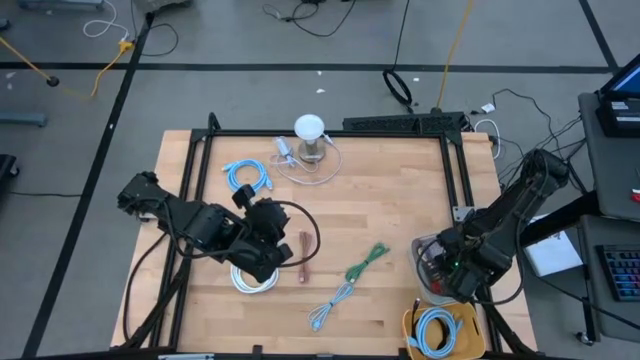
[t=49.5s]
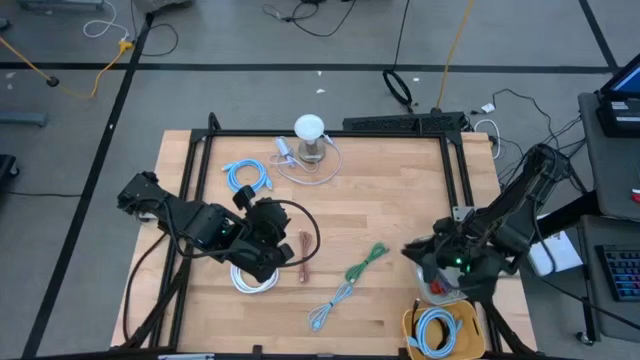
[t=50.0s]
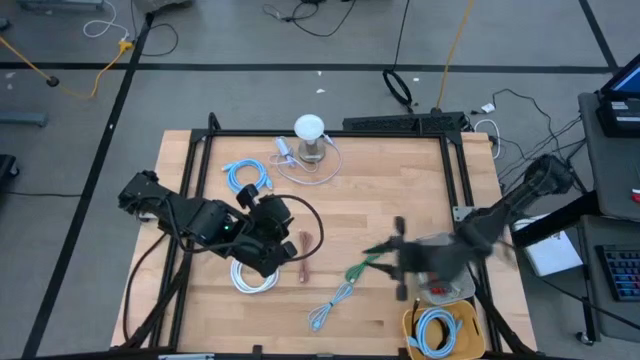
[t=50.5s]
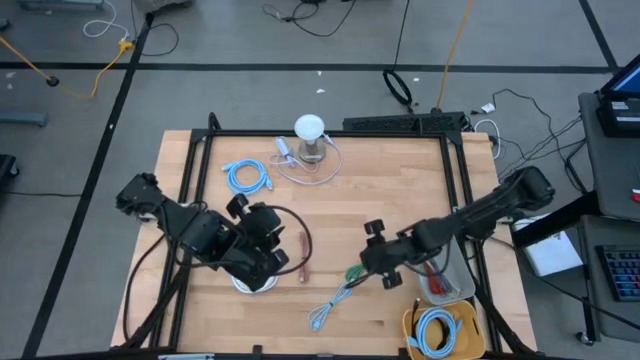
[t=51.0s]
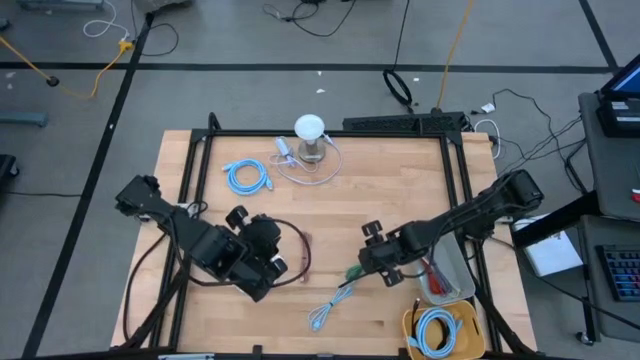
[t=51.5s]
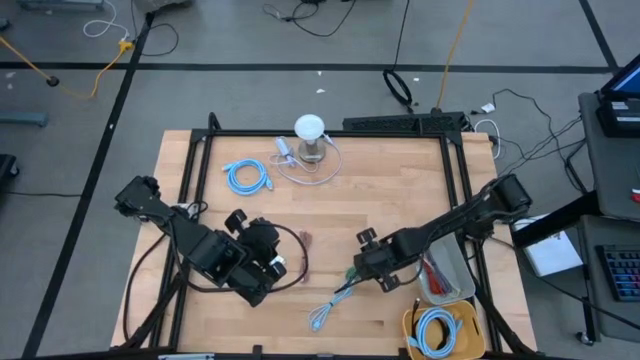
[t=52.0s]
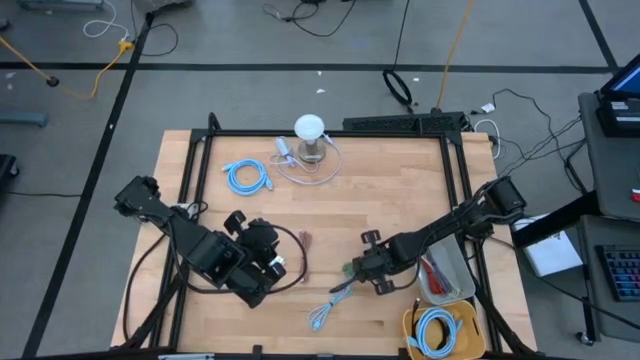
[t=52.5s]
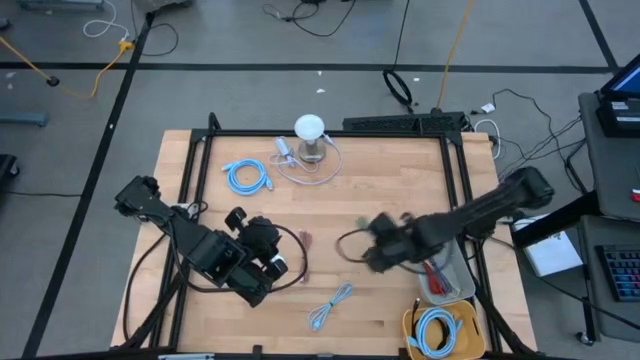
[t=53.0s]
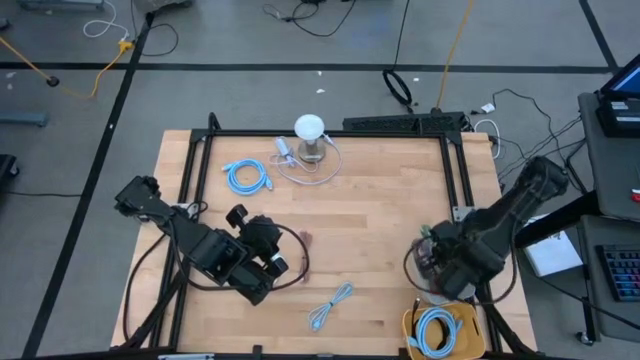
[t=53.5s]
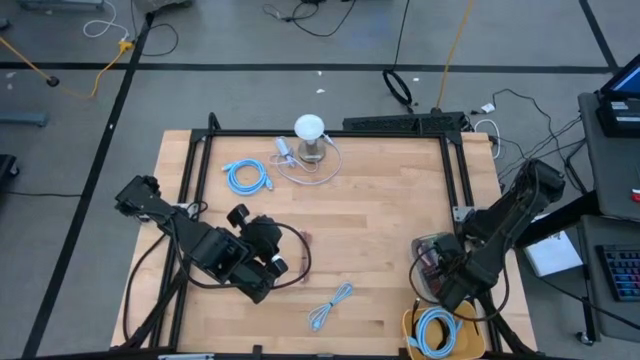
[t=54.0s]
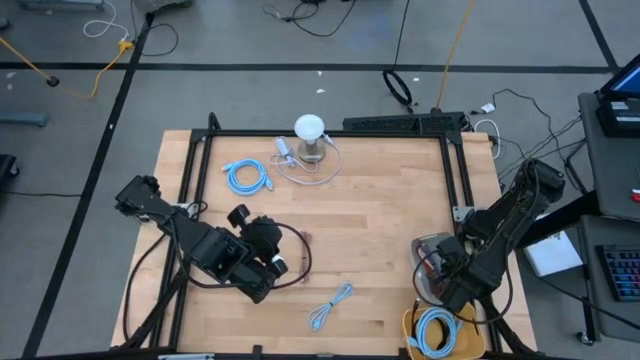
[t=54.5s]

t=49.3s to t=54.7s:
Task: Pick & Place USB Port
Put the green USB cable into the gray bin

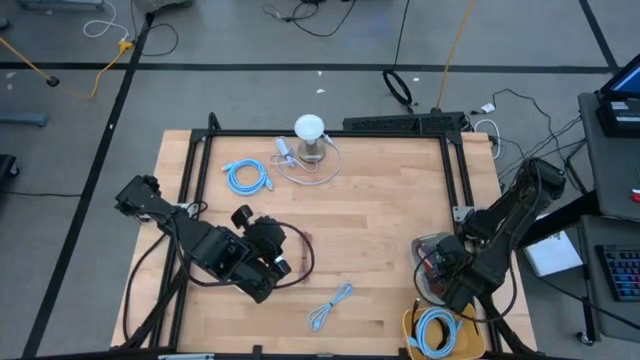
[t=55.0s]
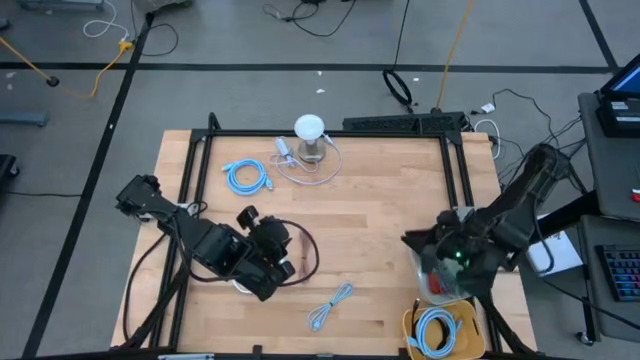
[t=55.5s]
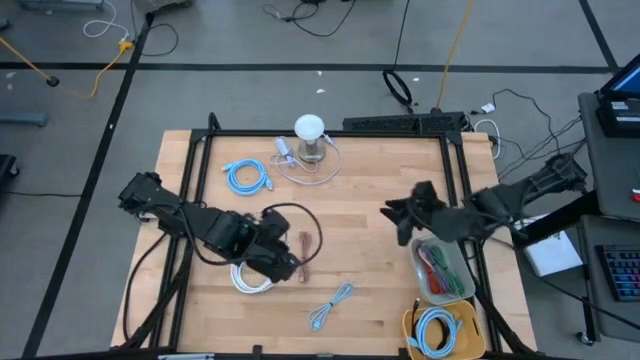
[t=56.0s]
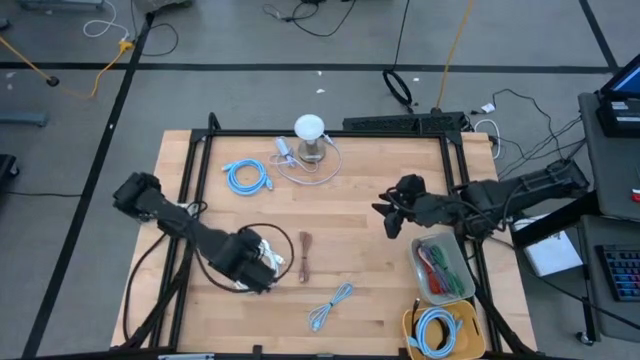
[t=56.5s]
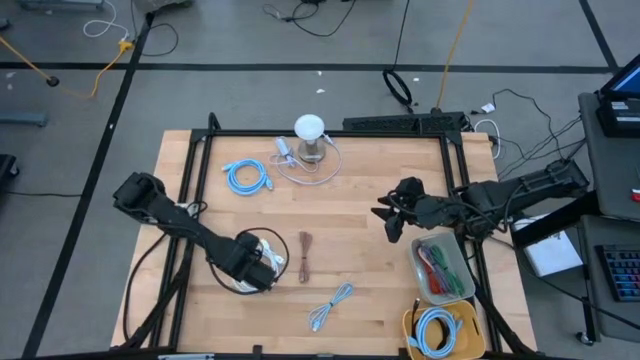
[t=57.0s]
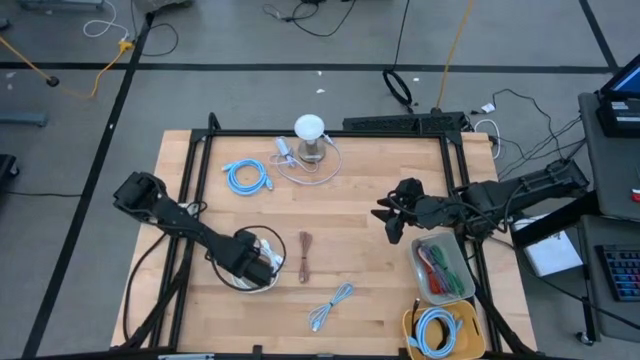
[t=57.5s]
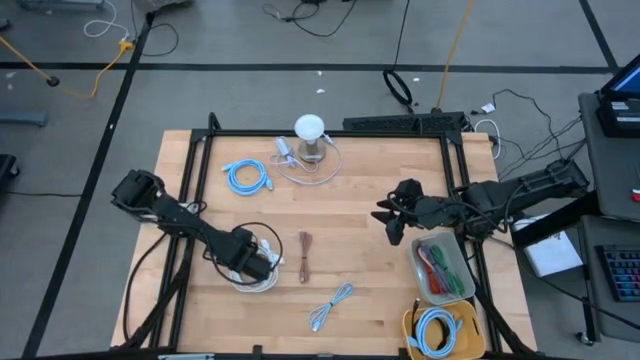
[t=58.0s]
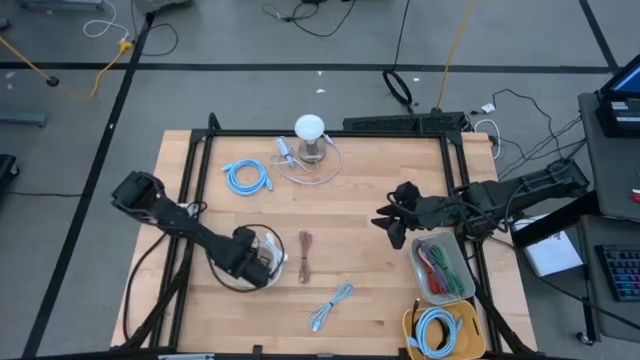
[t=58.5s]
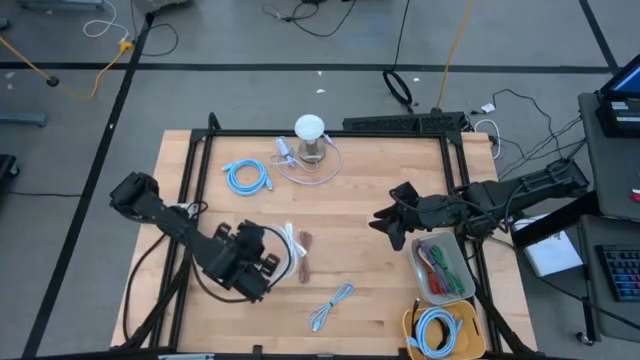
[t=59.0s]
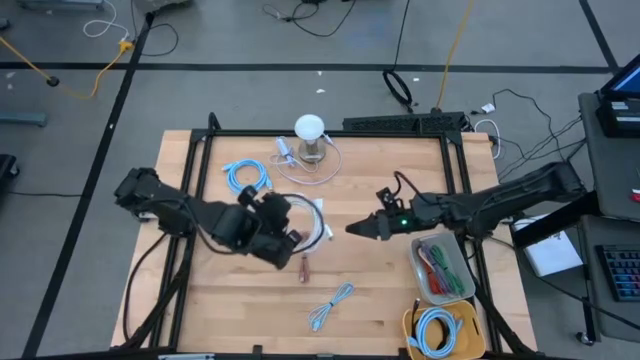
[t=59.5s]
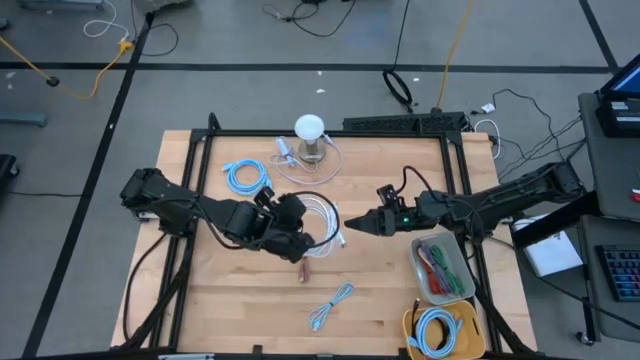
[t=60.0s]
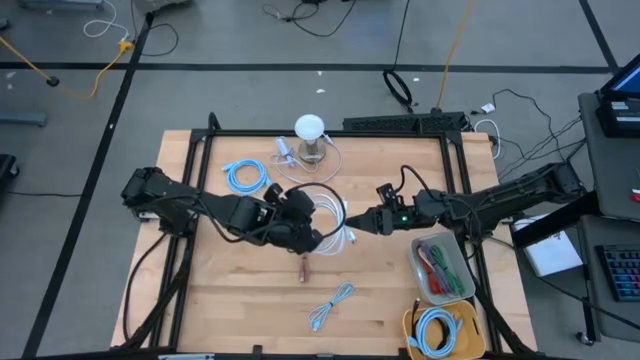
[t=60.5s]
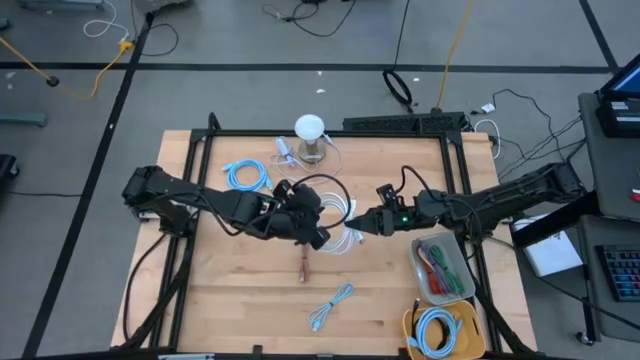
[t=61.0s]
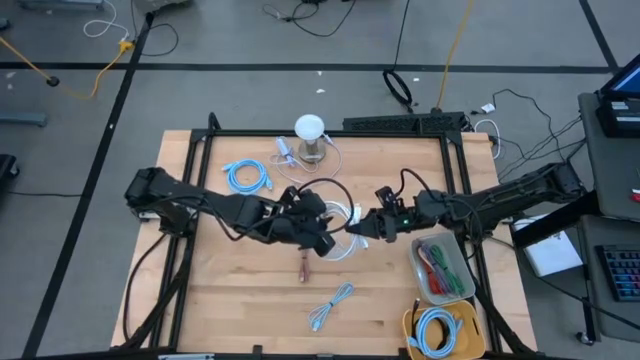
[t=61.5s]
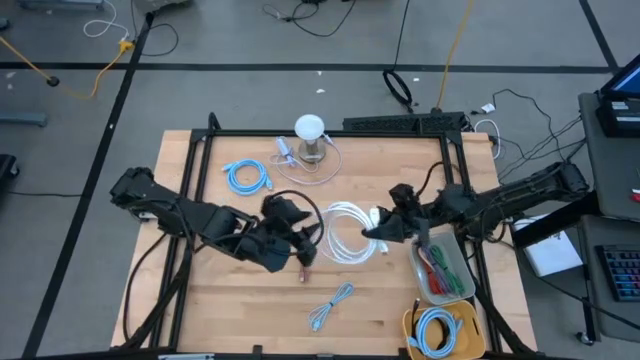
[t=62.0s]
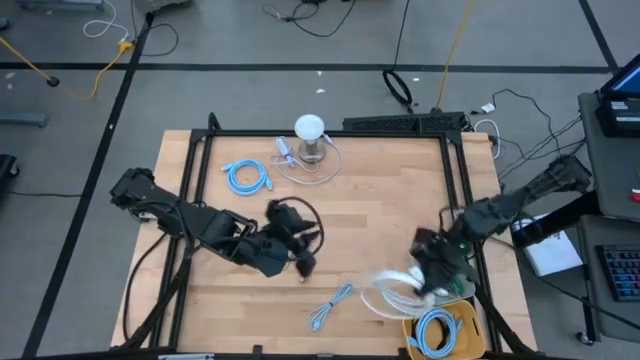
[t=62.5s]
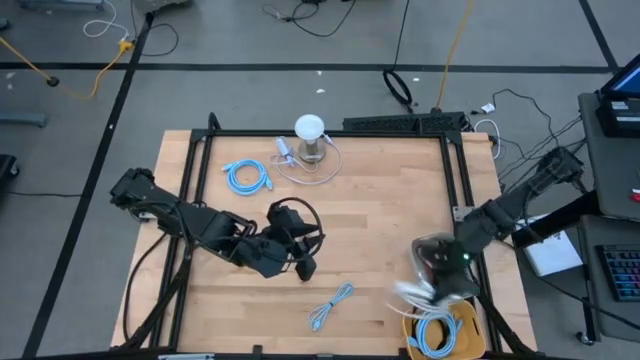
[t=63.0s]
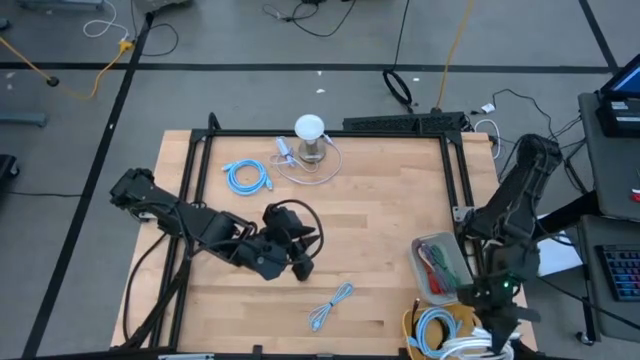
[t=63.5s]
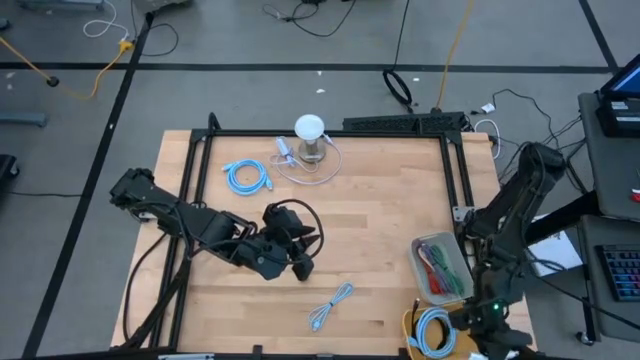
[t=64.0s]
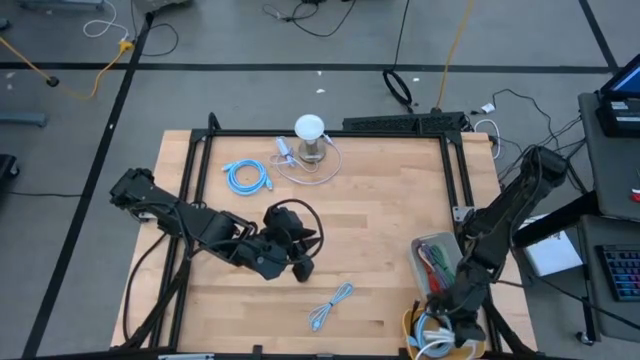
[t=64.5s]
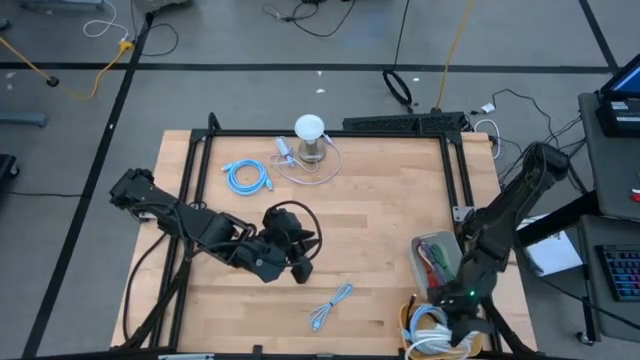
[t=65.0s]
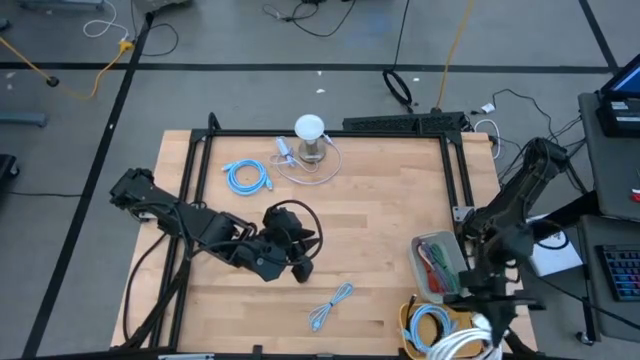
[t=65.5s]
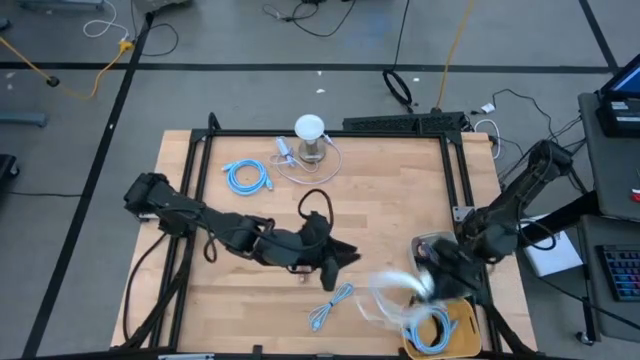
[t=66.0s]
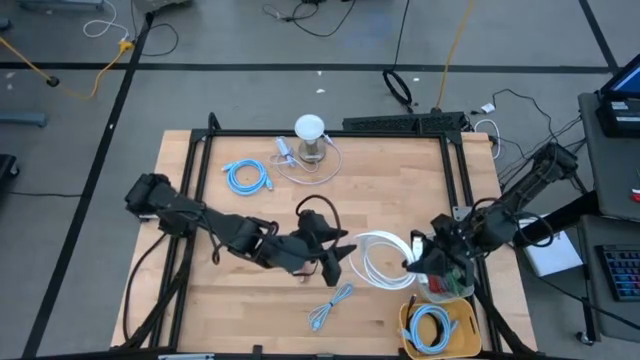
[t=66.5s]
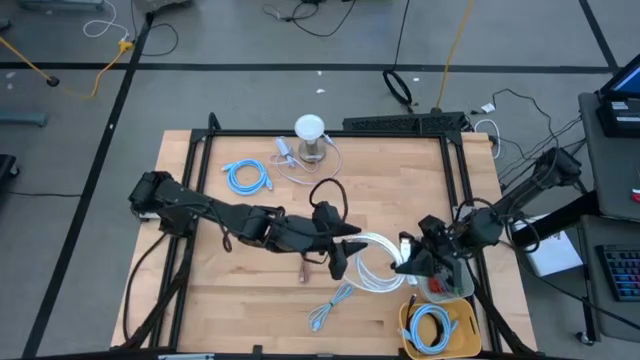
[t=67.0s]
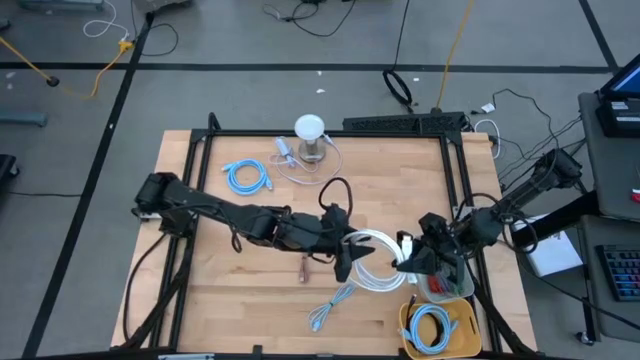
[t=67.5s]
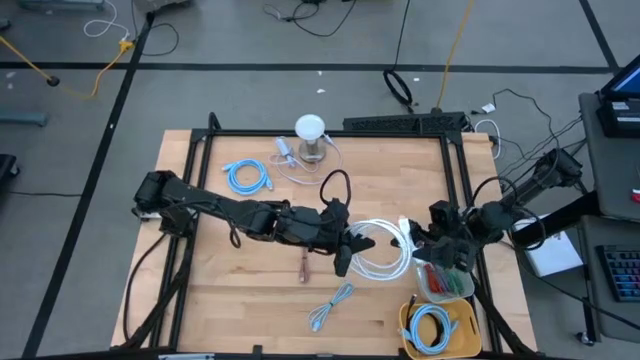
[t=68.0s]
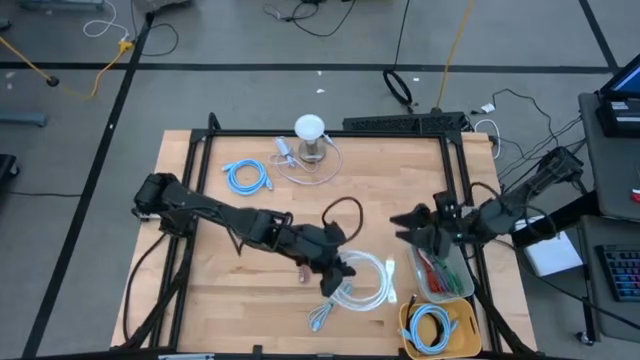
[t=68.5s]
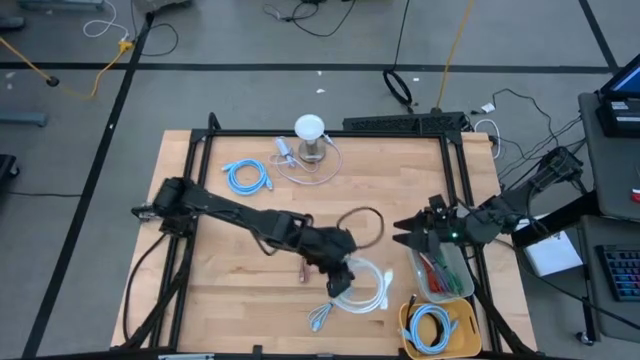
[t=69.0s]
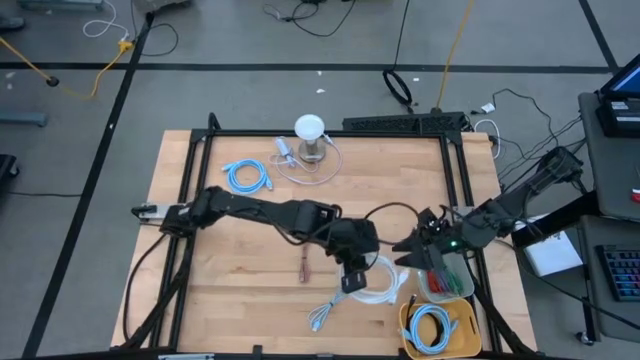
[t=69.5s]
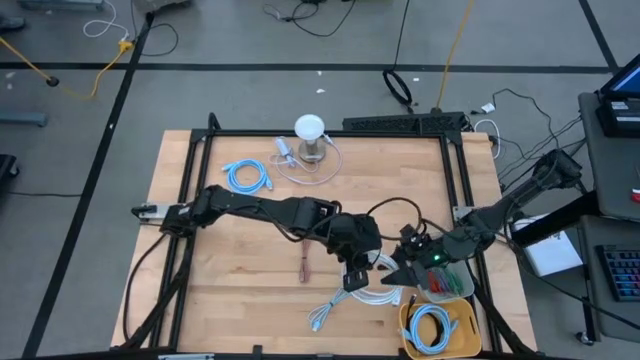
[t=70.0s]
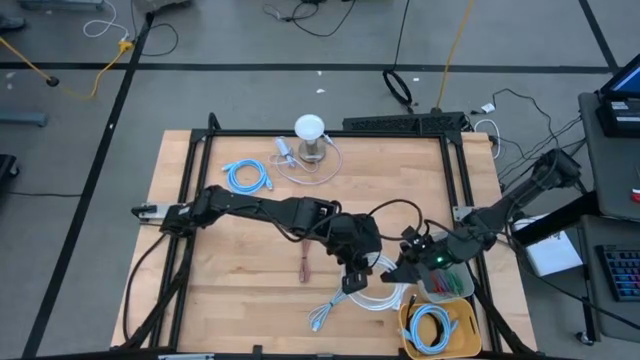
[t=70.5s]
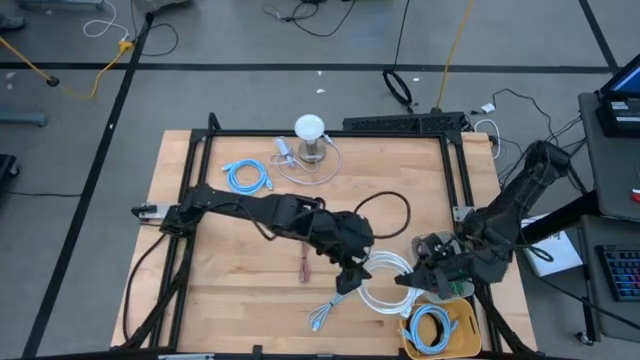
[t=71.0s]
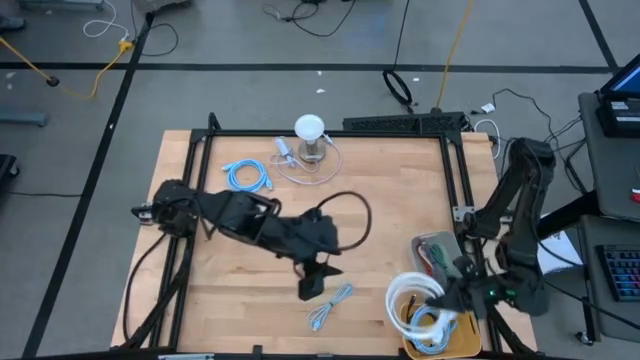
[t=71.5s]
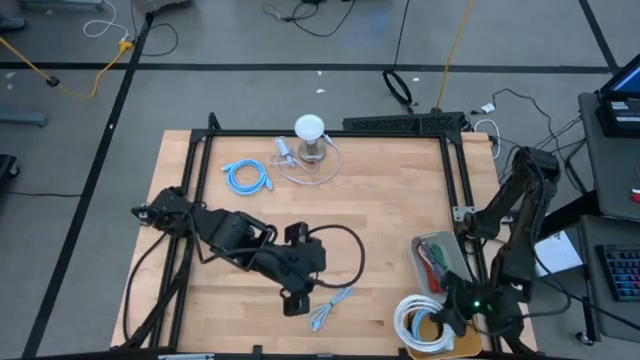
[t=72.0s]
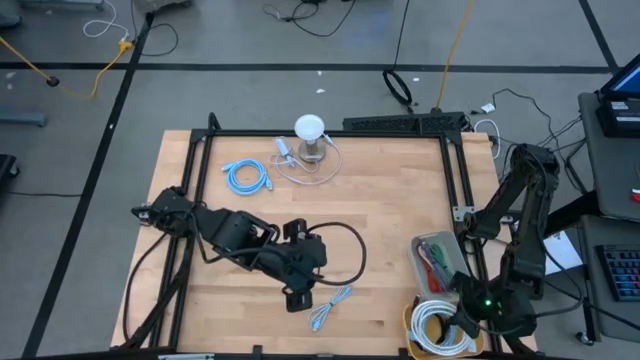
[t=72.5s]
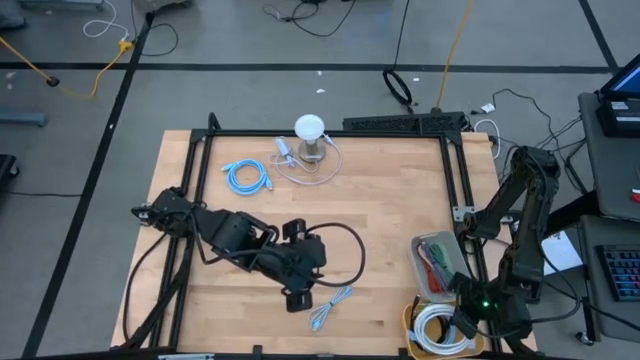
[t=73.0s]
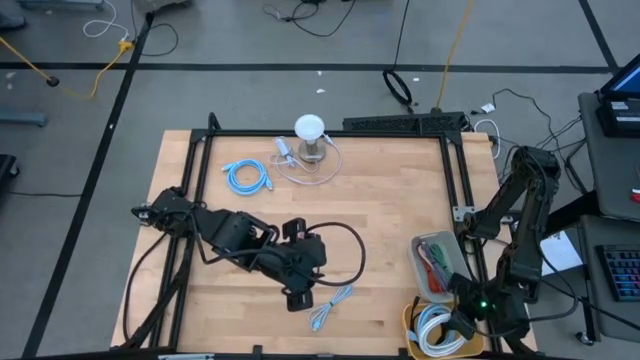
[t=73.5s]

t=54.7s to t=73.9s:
Put the white HDMI cable into the yellow bin
